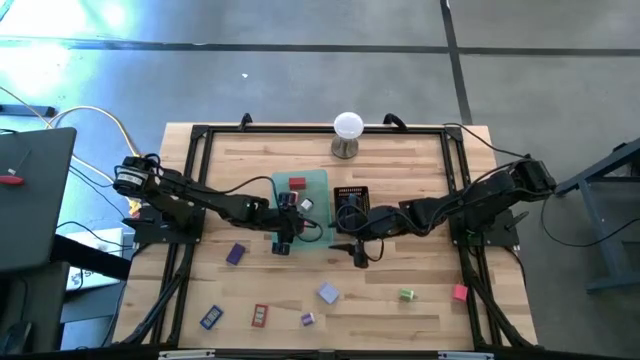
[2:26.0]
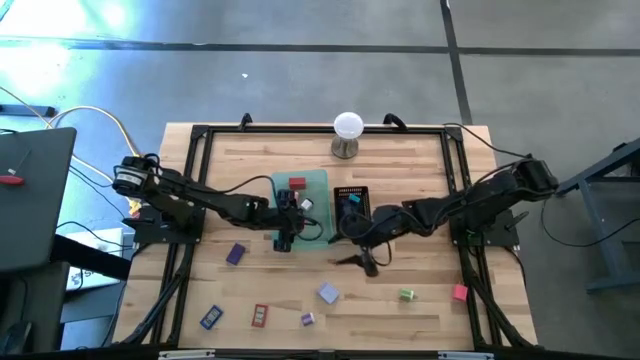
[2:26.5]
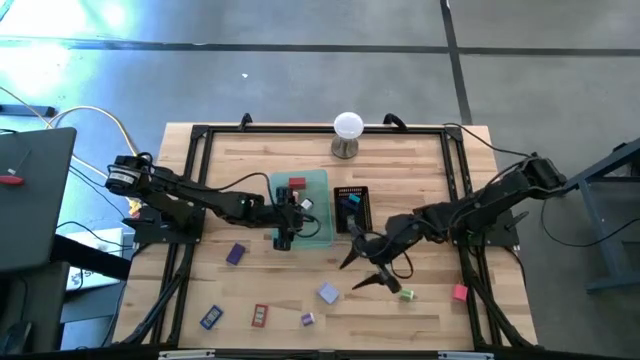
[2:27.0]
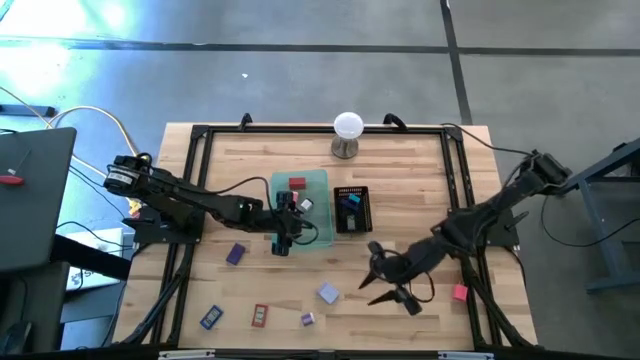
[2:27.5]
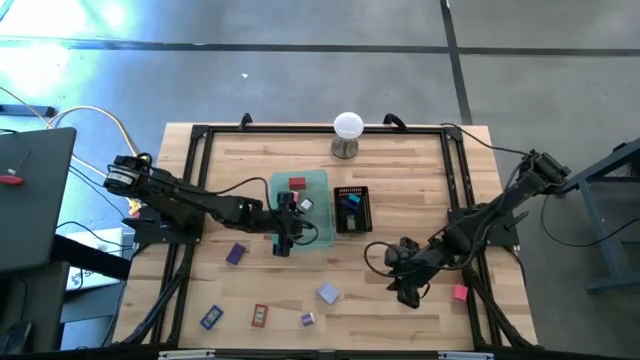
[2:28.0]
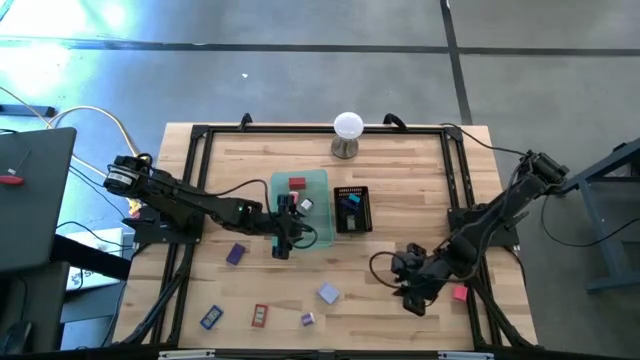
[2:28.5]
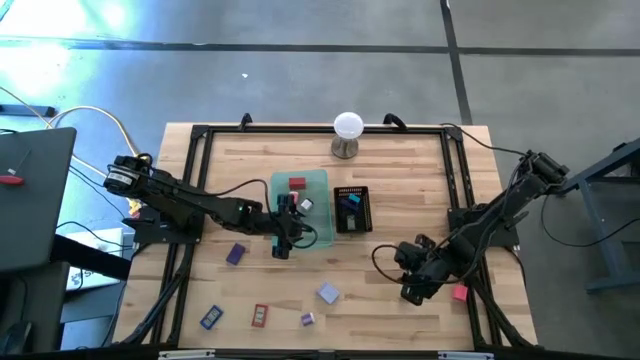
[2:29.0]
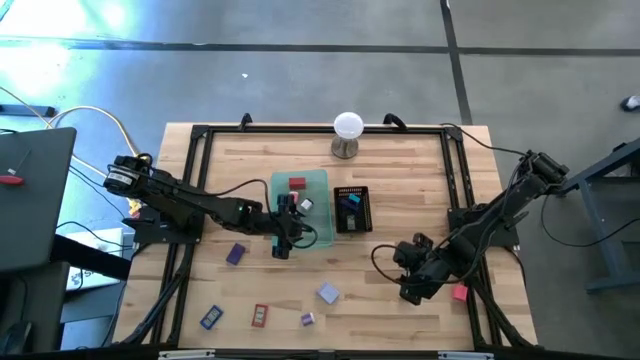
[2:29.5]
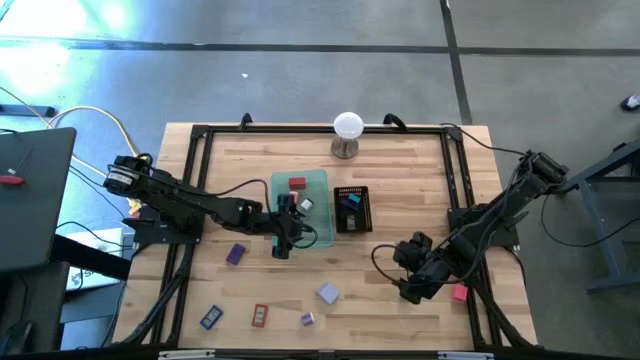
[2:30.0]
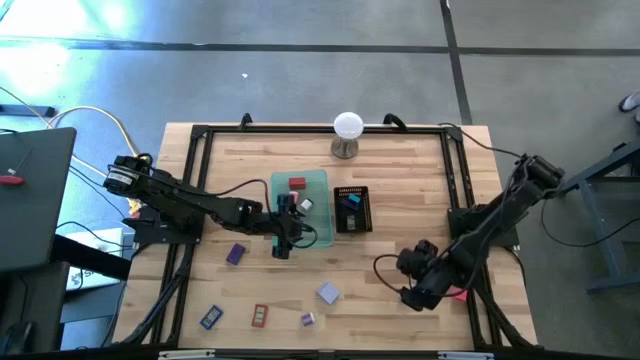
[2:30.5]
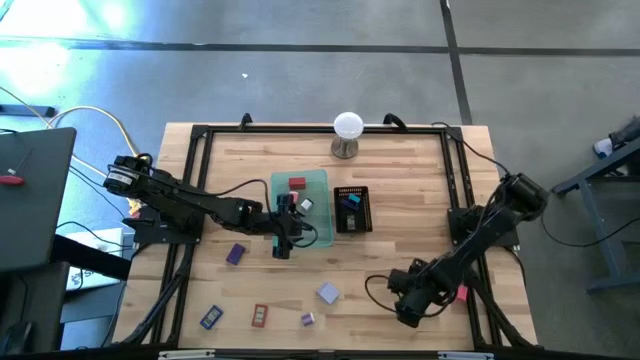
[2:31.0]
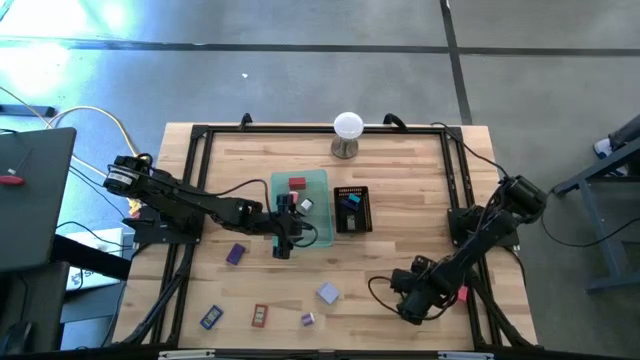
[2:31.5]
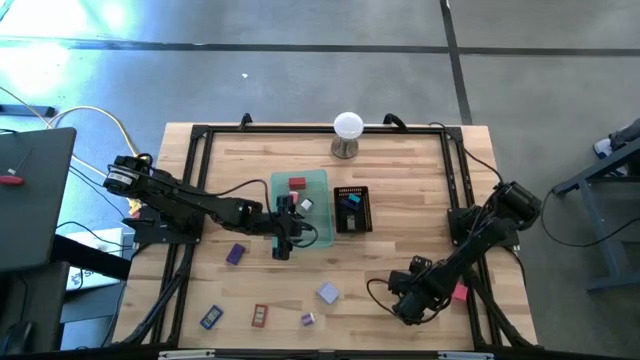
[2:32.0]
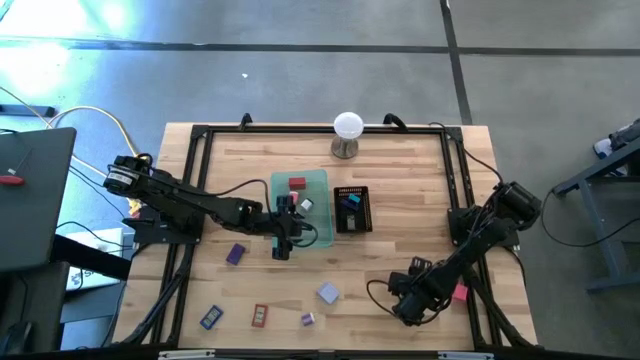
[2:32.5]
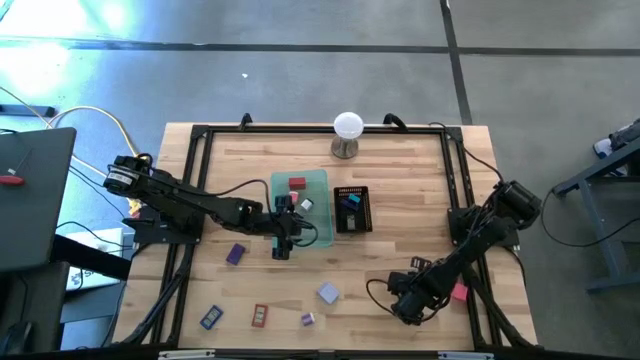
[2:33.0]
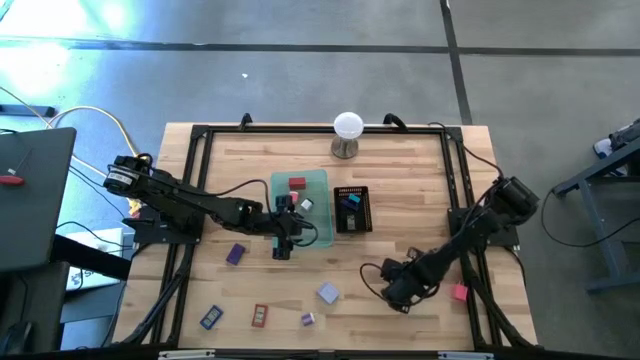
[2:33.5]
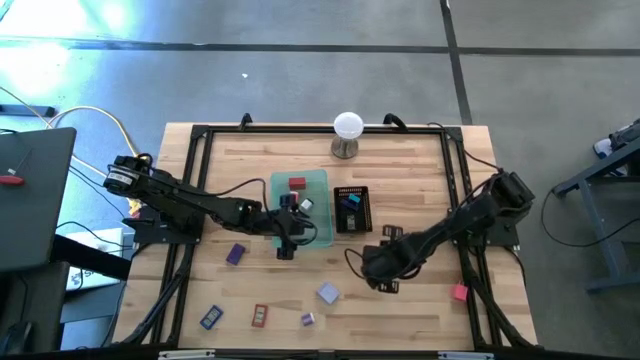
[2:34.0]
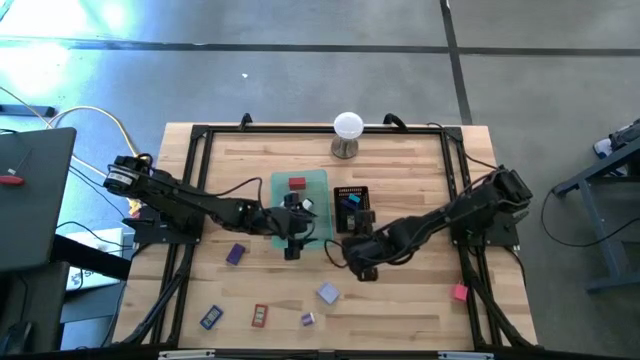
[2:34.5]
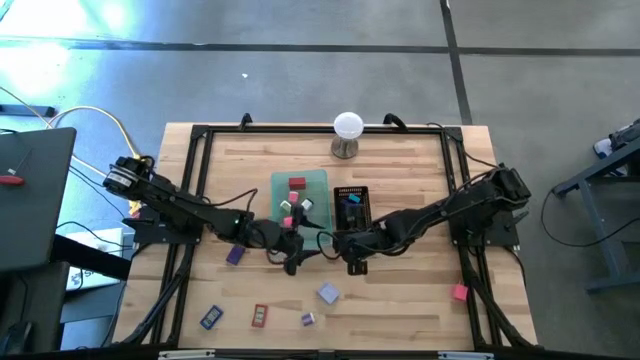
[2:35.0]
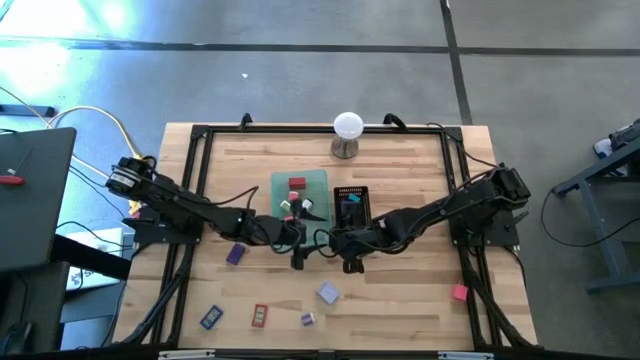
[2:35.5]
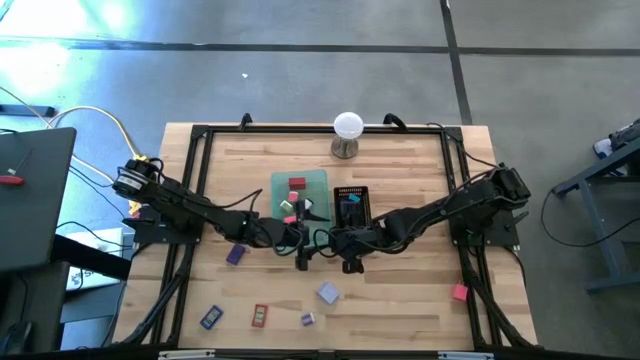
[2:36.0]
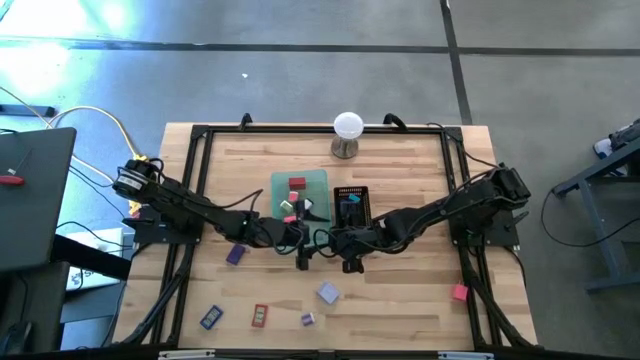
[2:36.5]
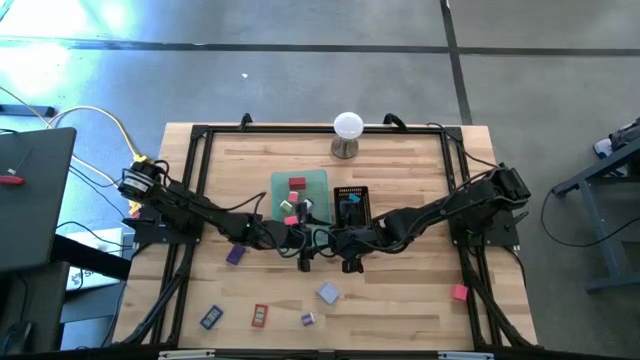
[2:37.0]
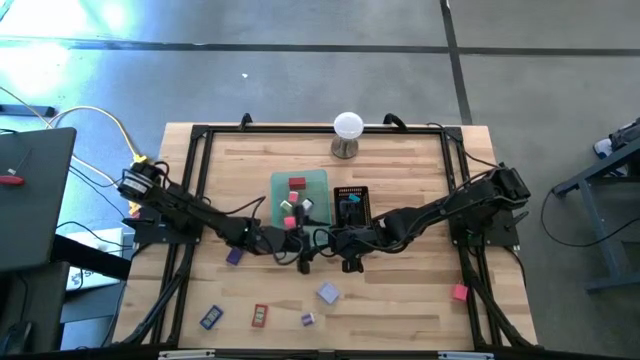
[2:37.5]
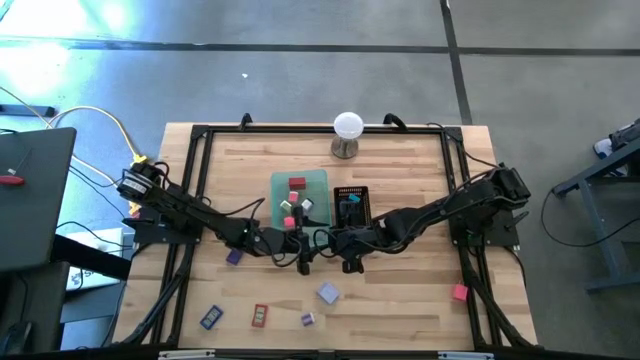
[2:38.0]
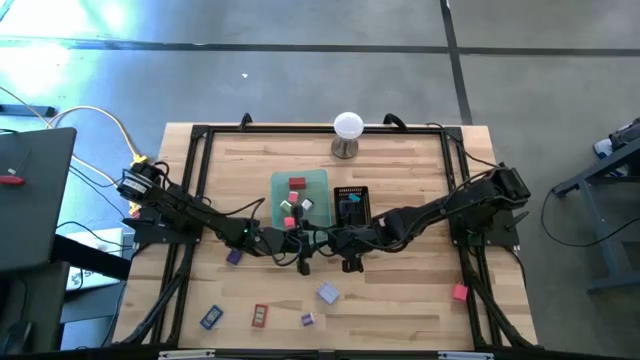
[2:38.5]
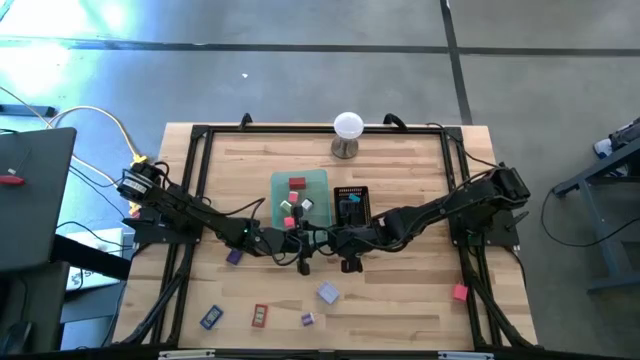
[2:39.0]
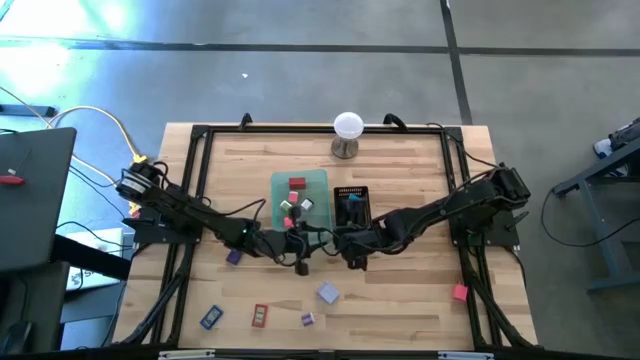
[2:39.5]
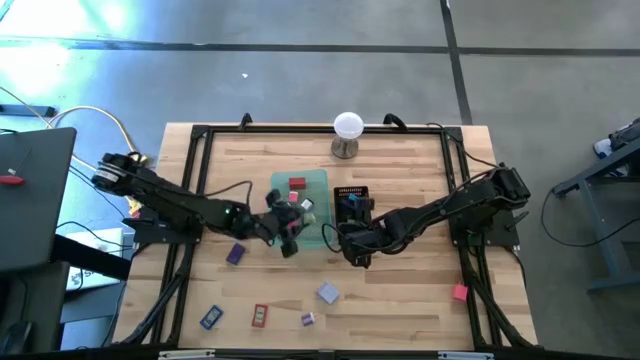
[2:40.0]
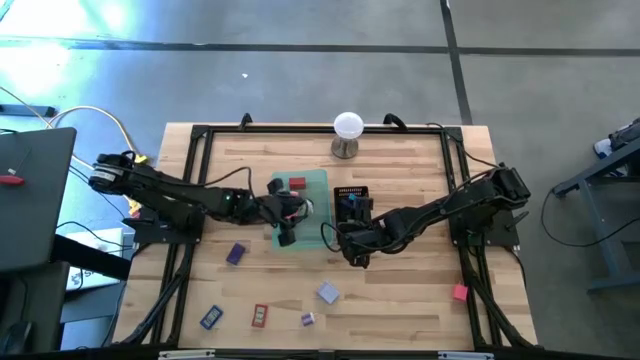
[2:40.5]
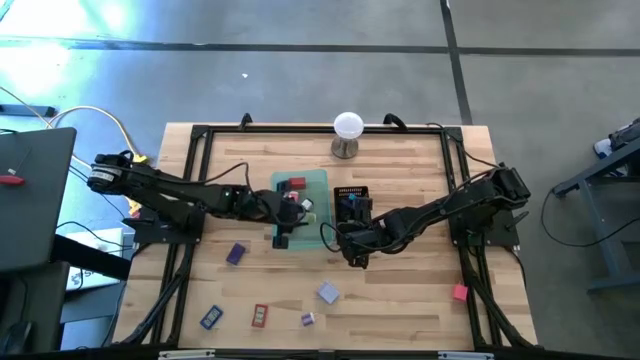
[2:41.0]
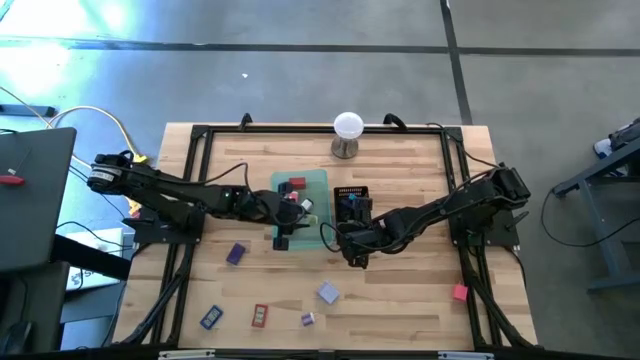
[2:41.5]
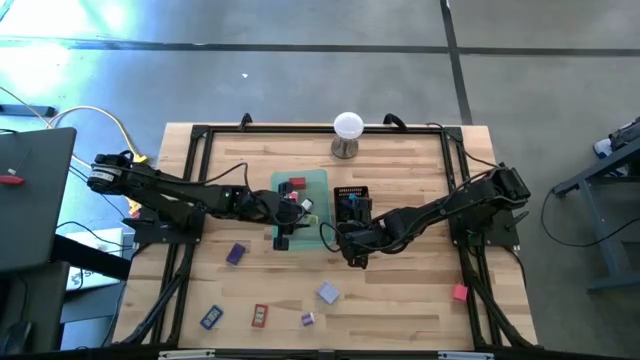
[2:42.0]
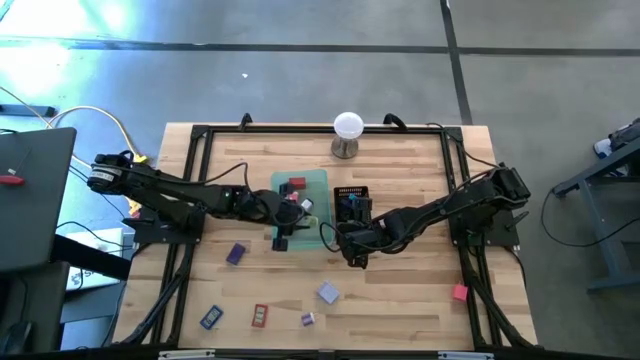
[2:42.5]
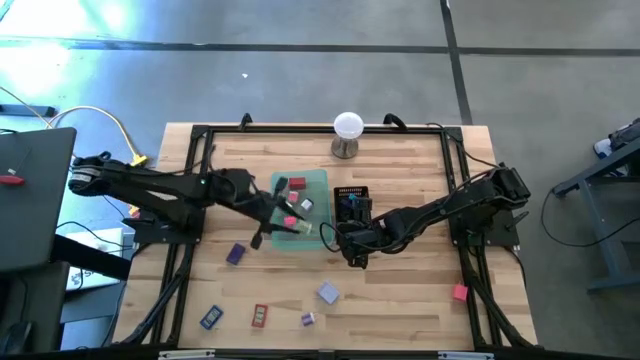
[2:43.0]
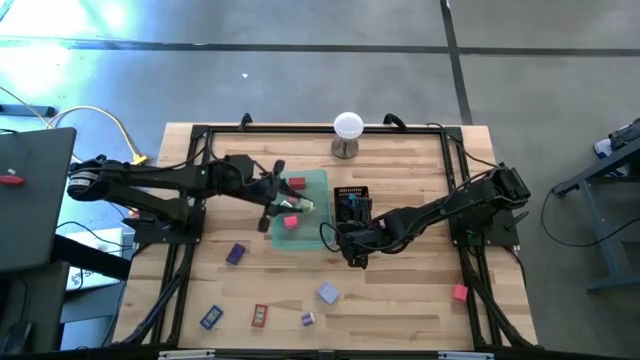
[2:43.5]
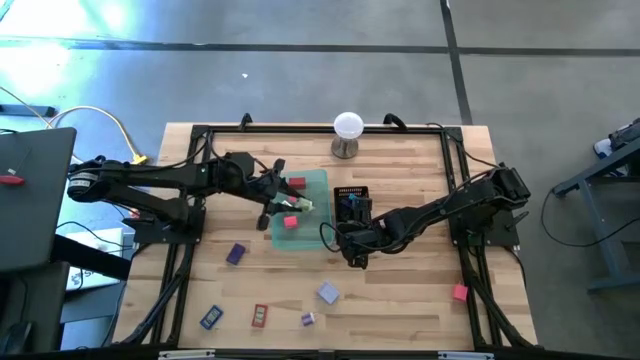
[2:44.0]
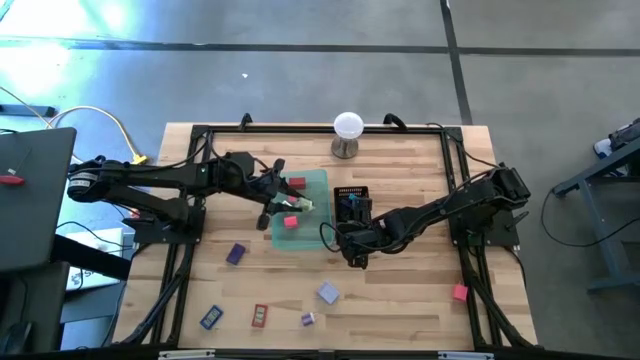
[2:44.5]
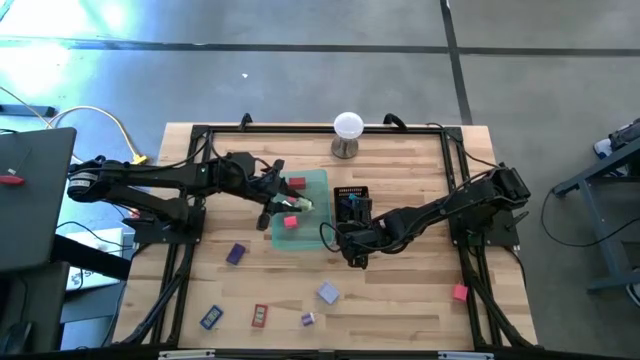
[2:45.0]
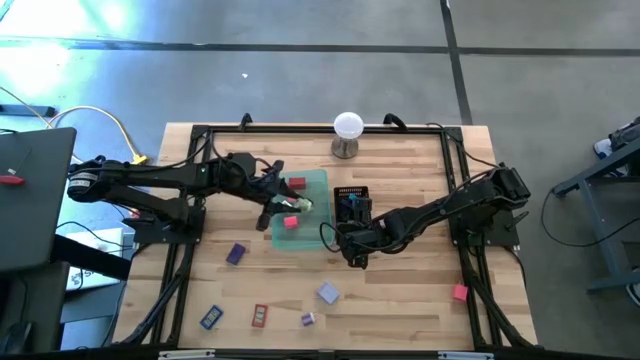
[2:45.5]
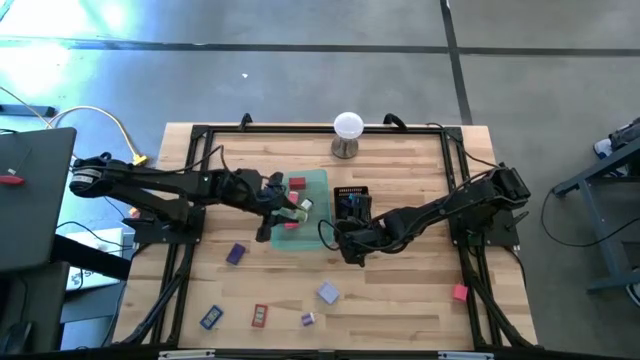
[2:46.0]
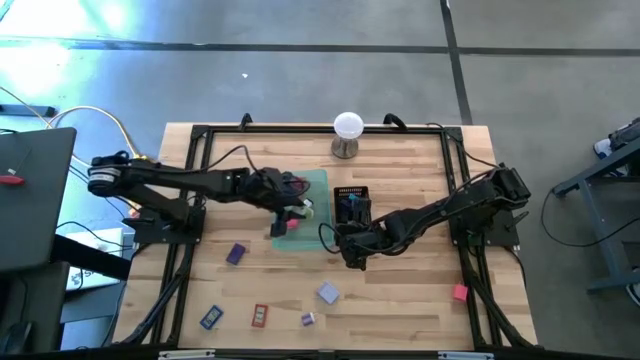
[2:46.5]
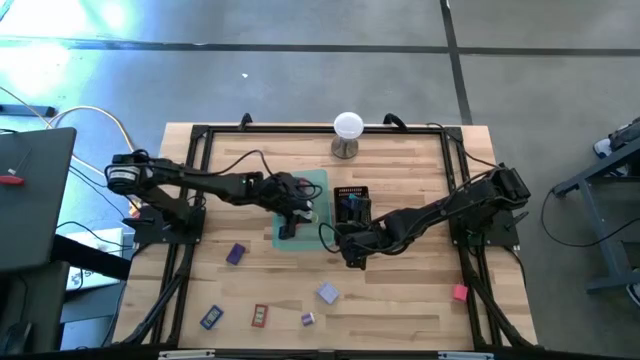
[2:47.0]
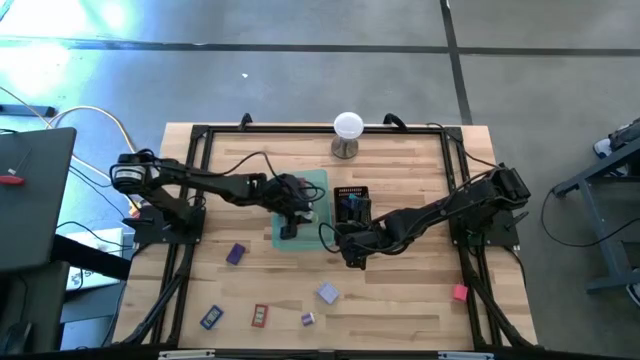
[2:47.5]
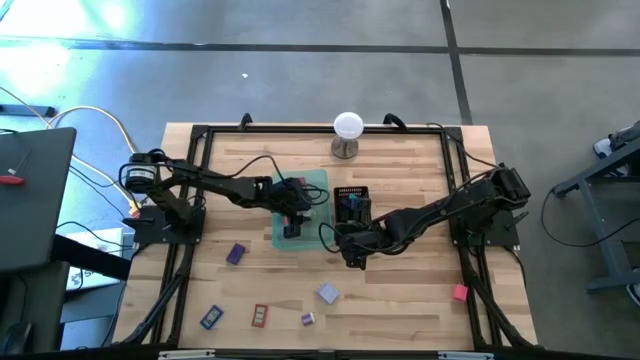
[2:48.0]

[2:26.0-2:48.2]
Task: Pick & Place Office items
Put the green charger adapter into the blue bin

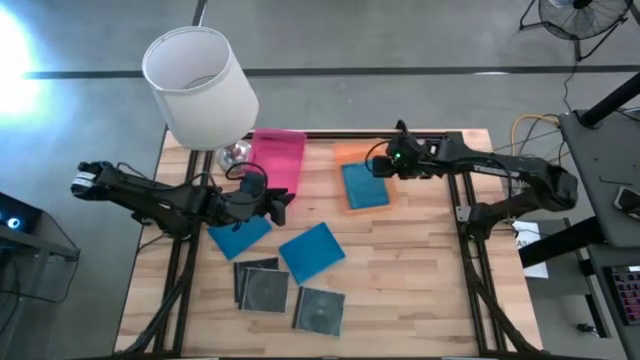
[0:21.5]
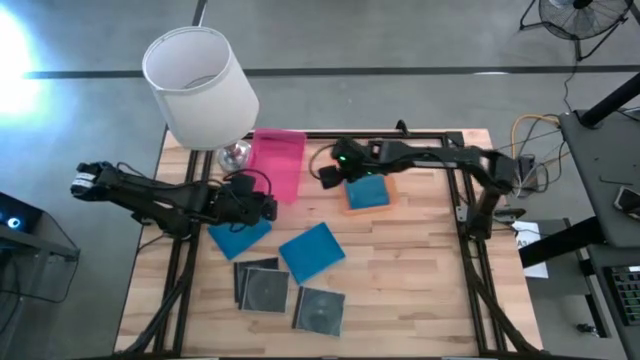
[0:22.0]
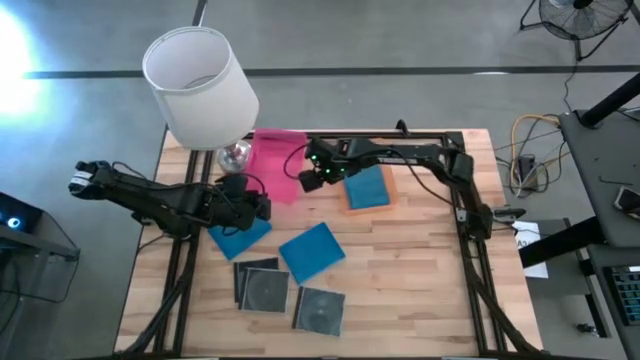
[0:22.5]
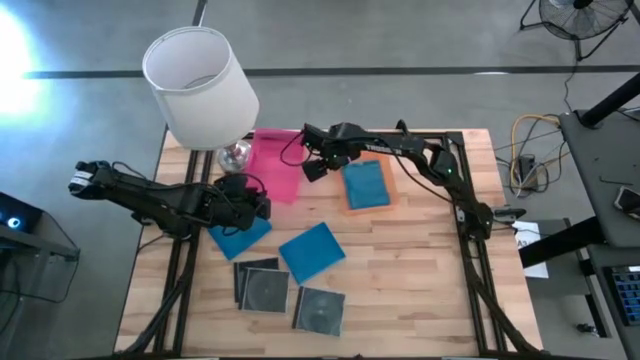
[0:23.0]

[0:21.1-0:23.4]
Task: Pick & place jewel cases by type
Adjust the orange bin
